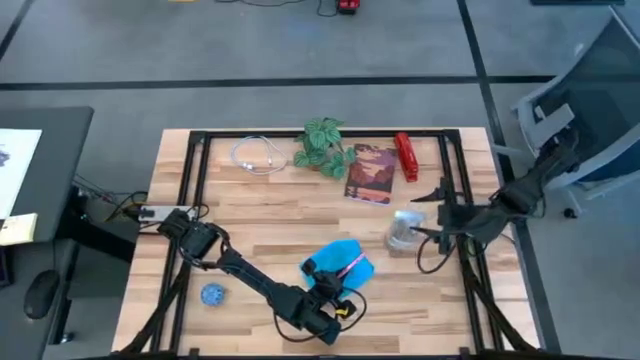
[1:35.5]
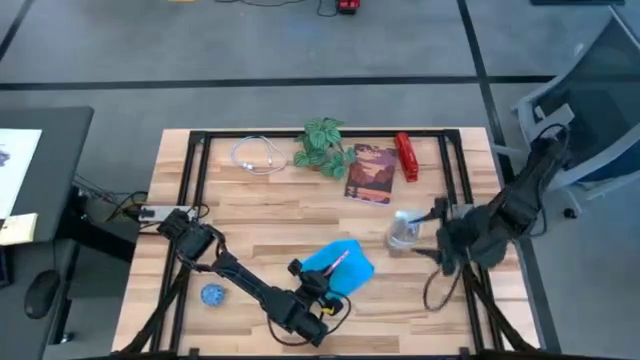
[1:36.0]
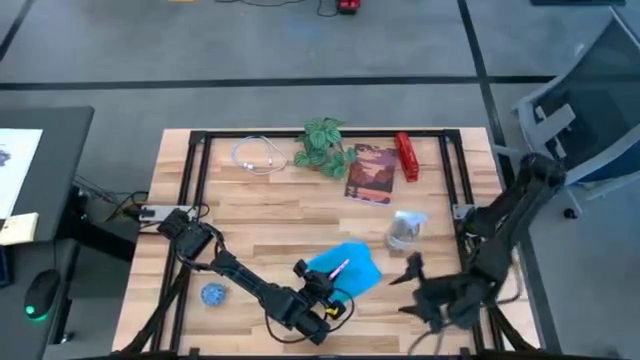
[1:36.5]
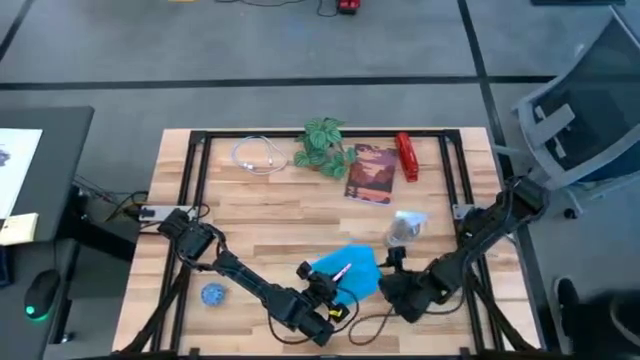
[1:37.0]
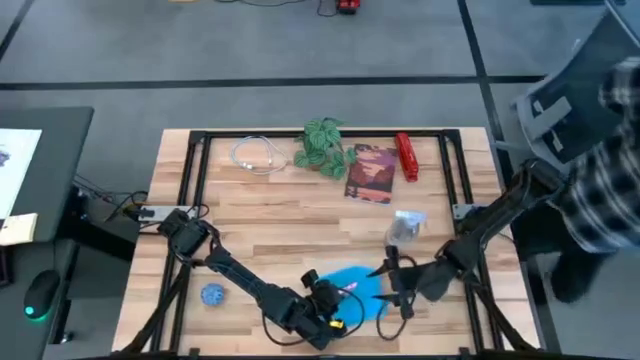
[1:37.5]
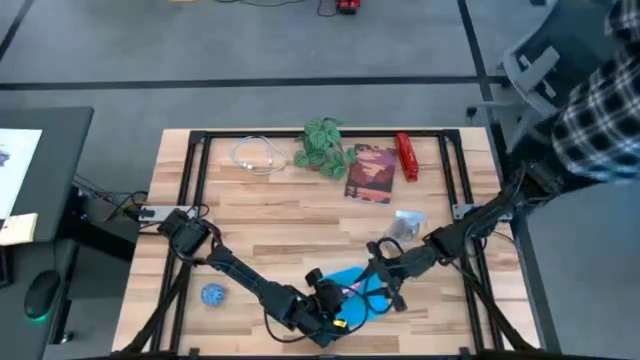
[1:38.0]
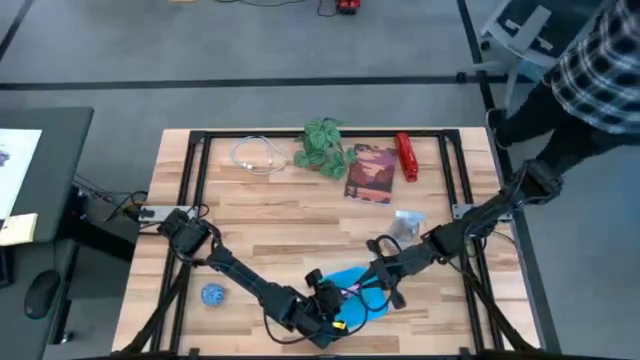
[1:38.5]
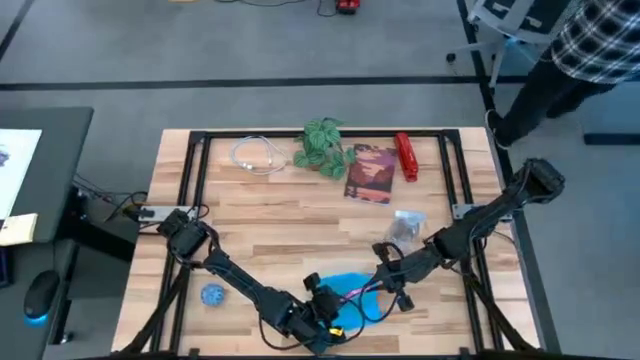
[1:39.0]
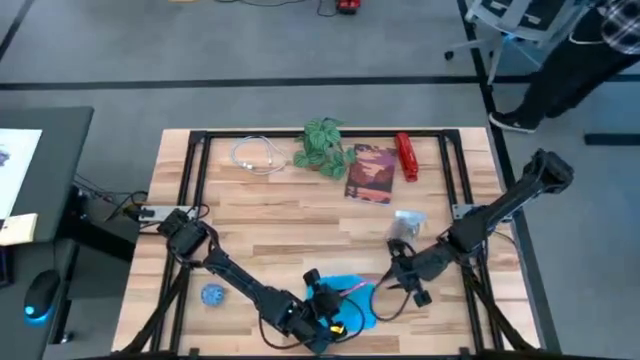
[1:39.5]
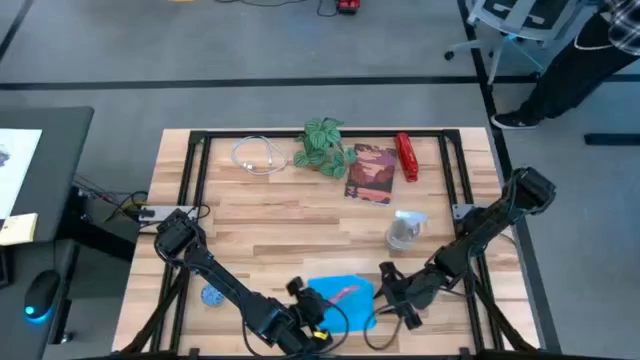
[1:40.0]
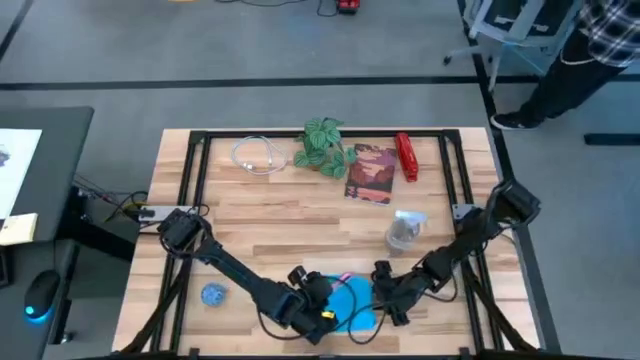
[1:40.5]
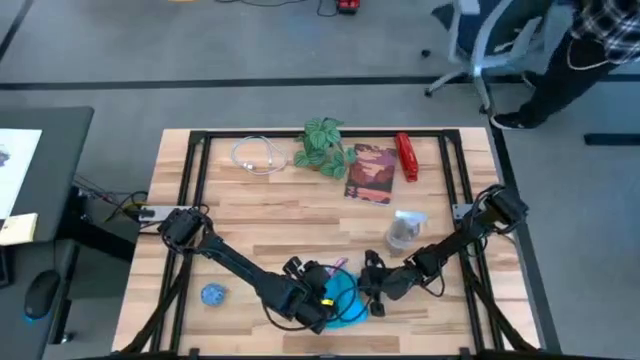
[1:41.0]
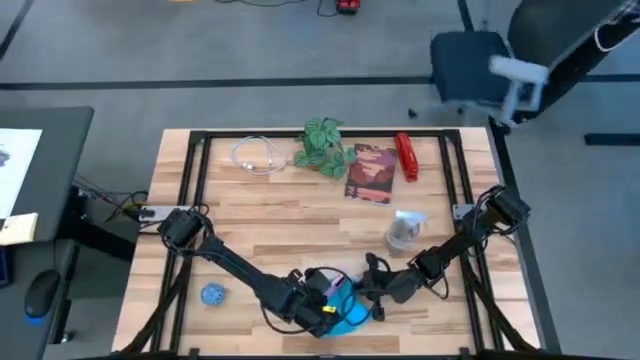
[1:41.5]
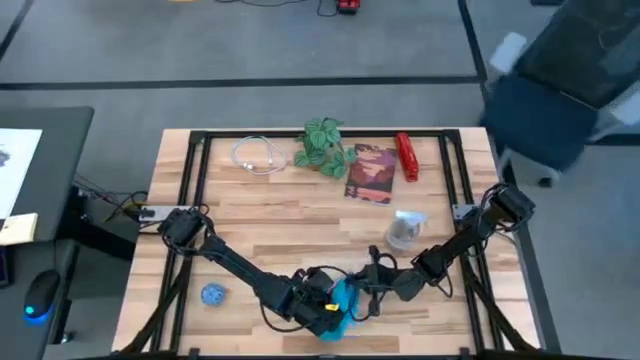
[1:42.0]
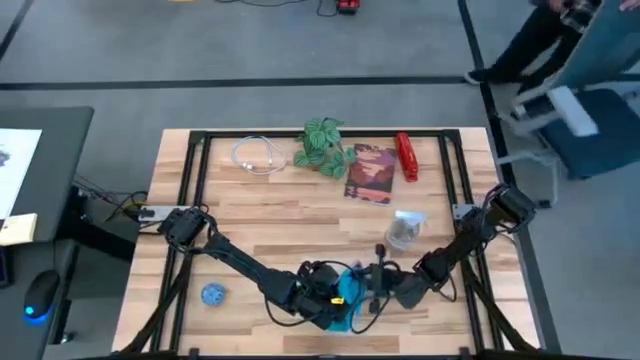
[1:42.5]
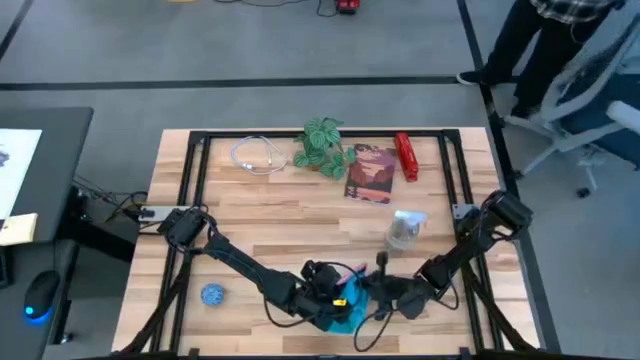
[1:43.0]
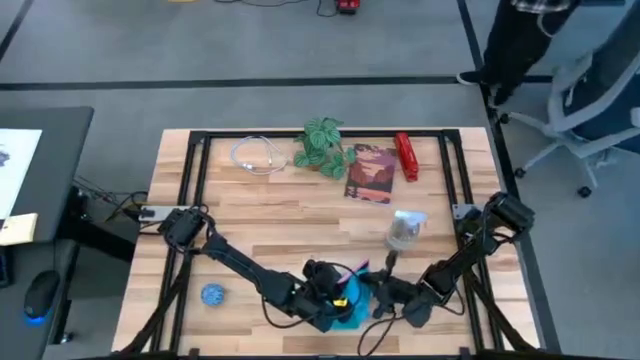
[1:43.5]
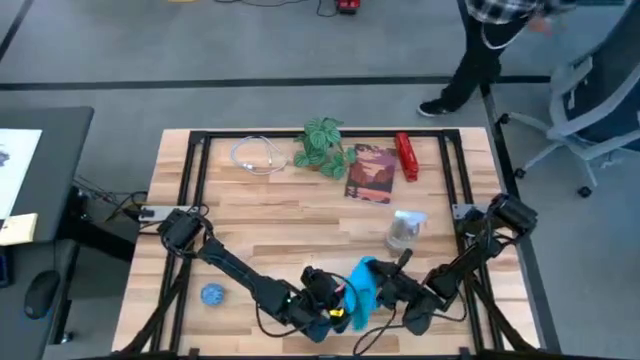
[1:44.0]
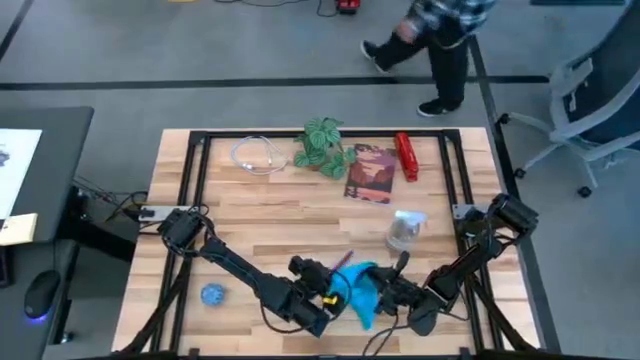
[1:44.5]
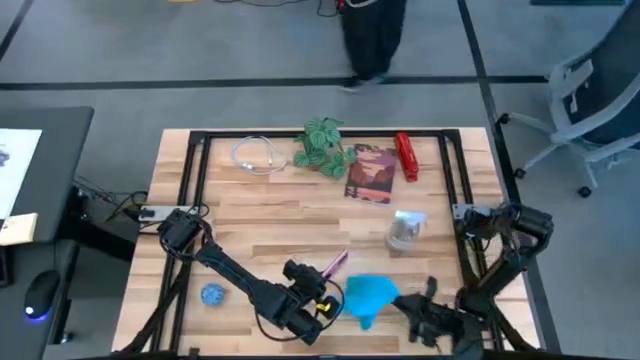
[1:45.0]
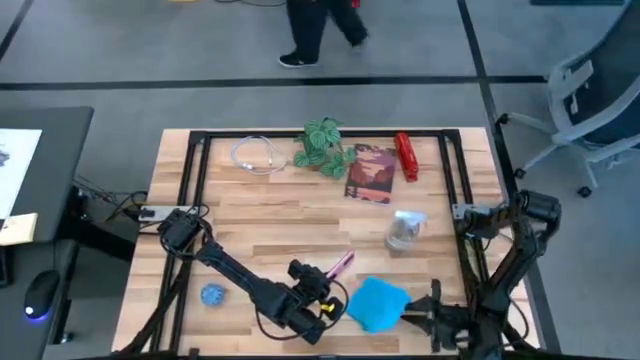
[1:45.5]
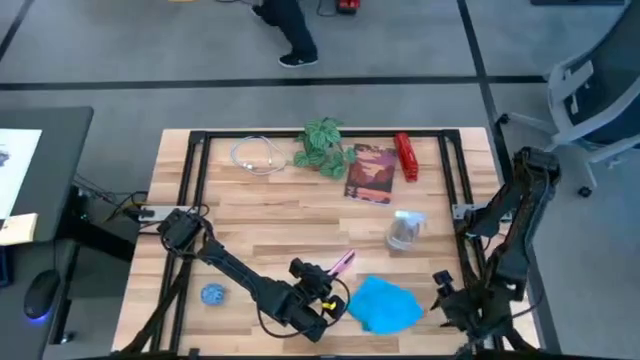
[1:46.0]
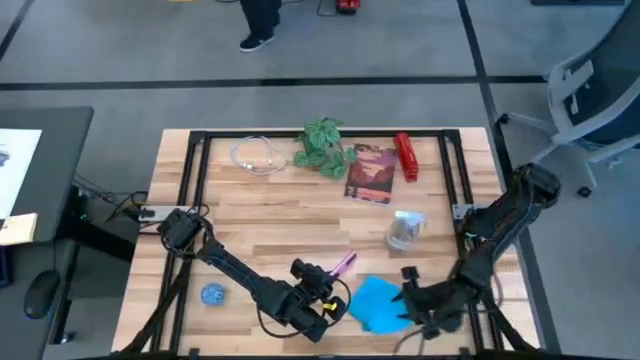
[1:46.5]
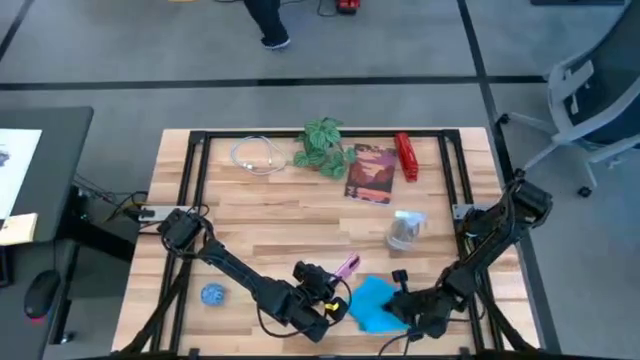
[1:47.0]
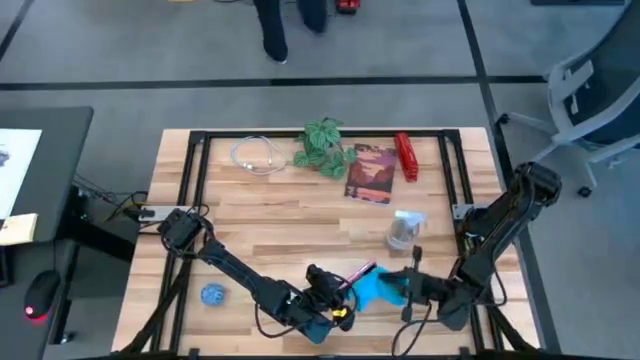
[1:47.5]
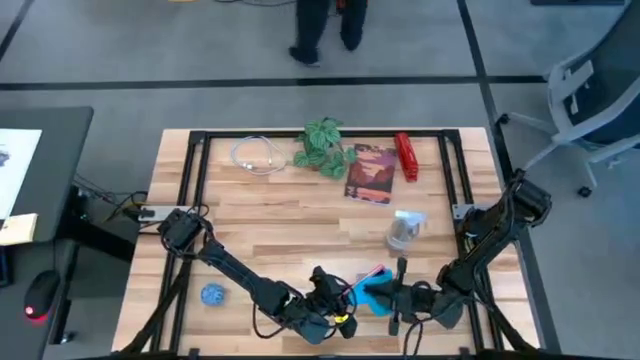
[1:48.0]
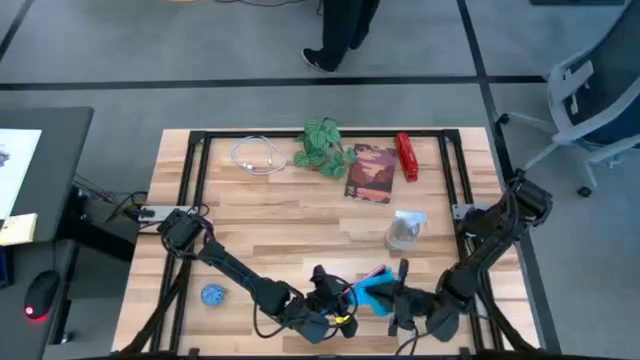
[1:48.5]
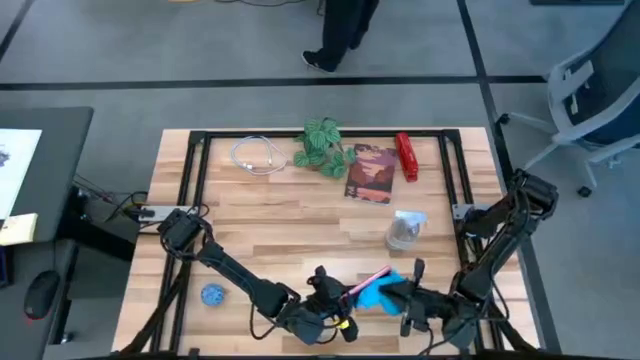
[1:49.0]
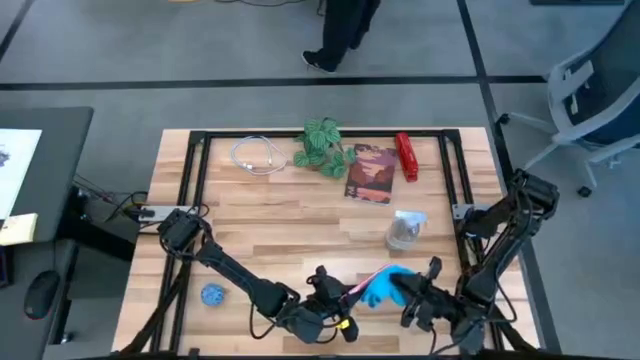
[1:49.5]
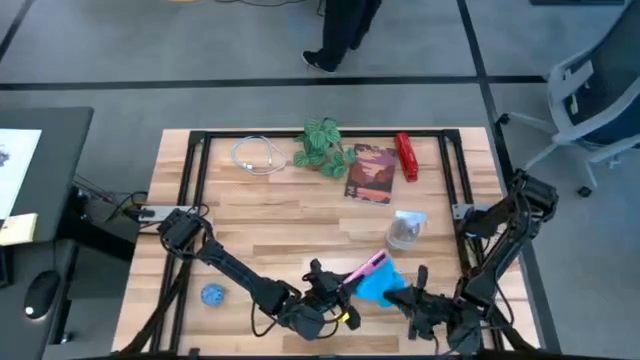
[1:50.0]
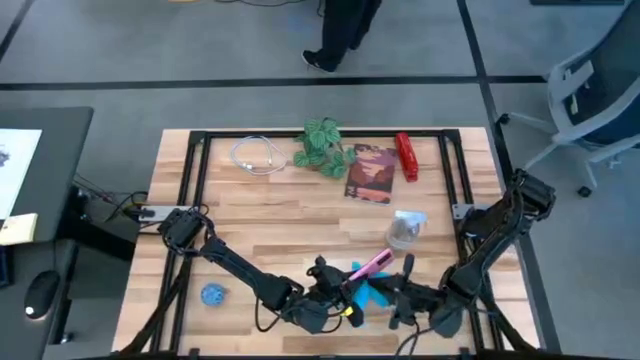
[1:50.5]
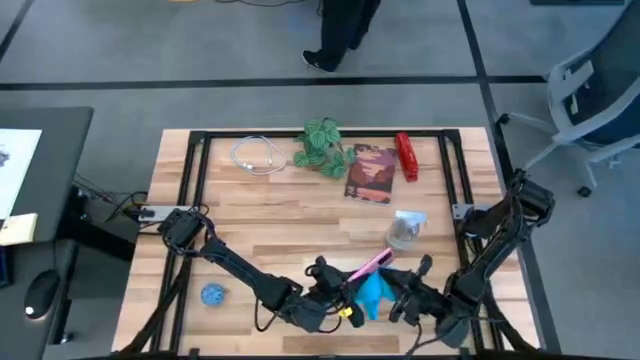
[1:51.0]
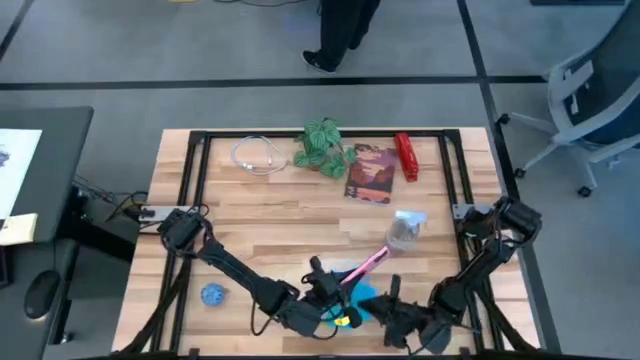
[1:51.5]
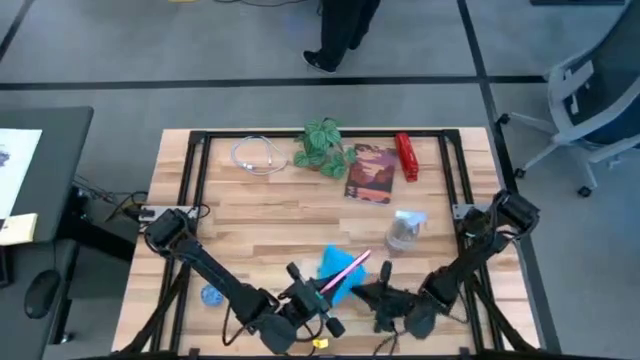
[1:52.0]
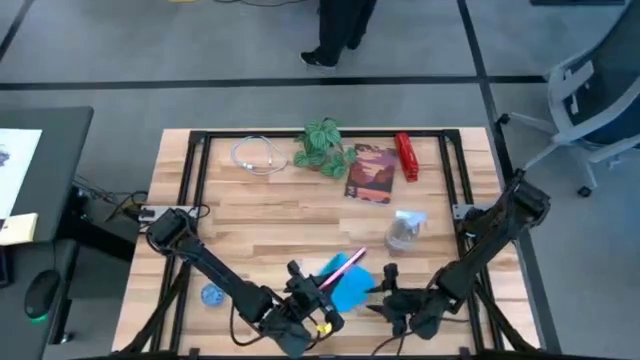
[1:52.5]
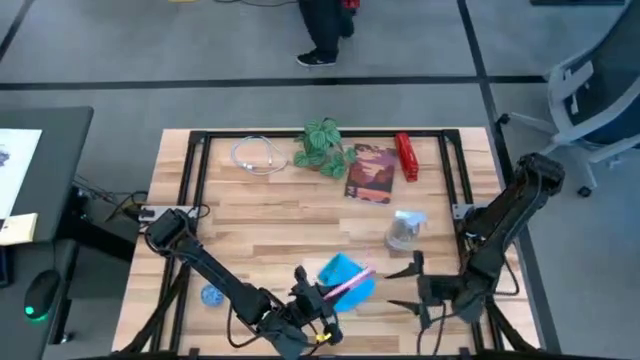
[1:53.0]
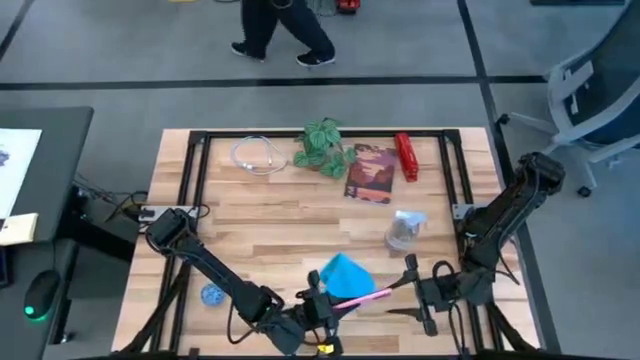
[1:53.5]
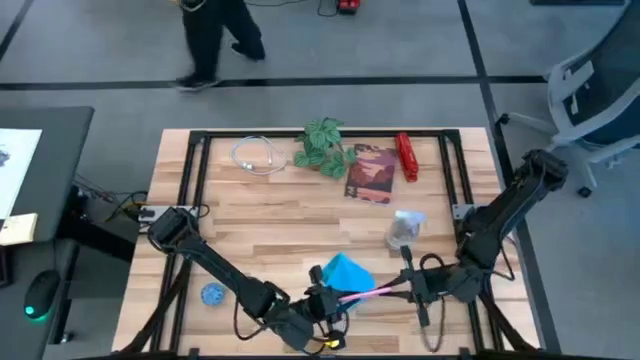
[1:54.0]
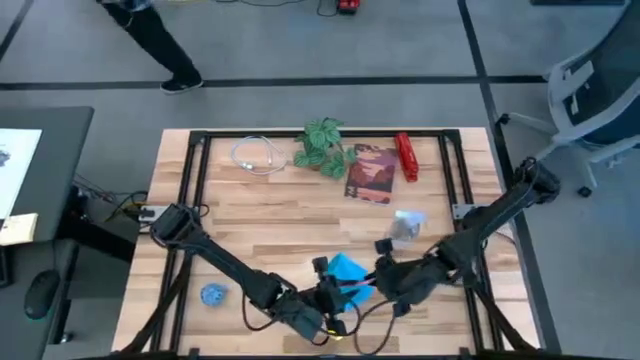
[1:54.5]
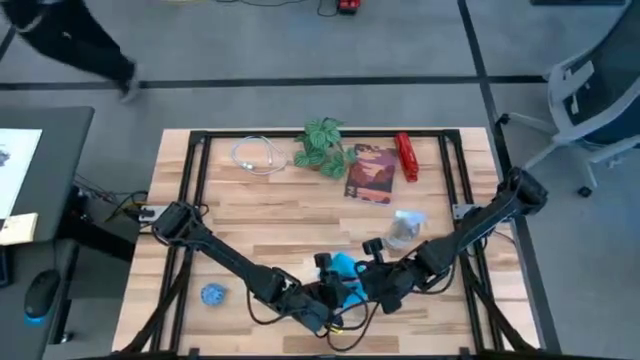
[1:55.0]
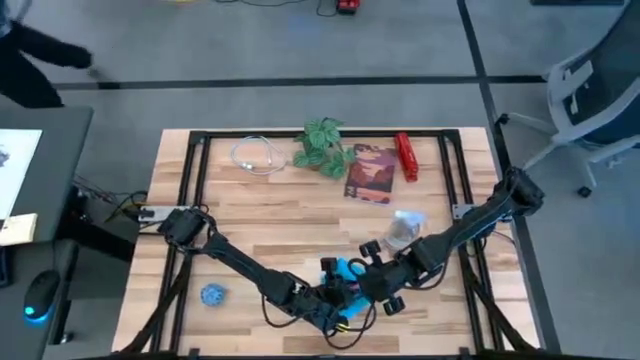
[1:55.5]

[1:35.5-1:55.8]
Task: Apply microfiber cloth
Wipe the back and front of the pink cellphone with the blue microfiber cloth

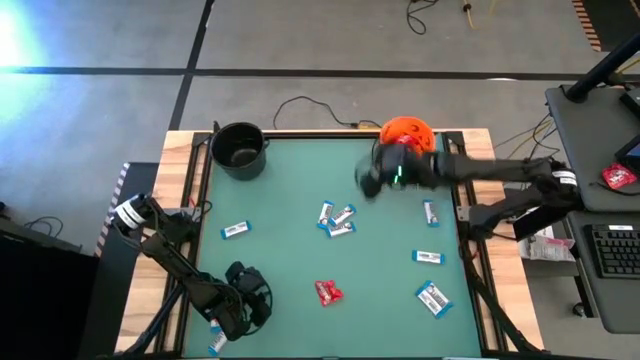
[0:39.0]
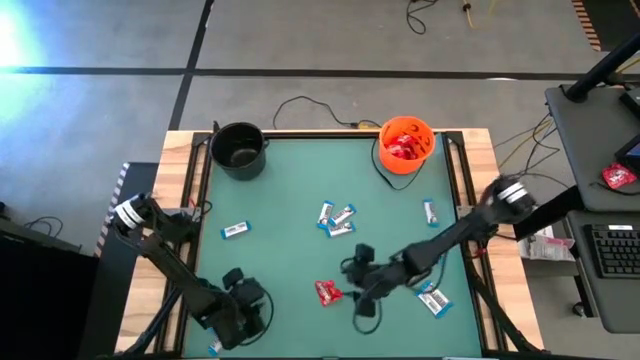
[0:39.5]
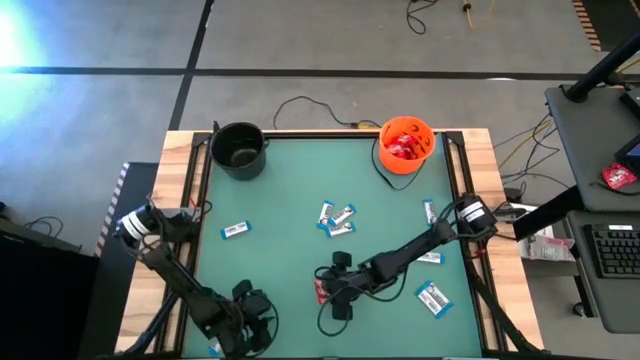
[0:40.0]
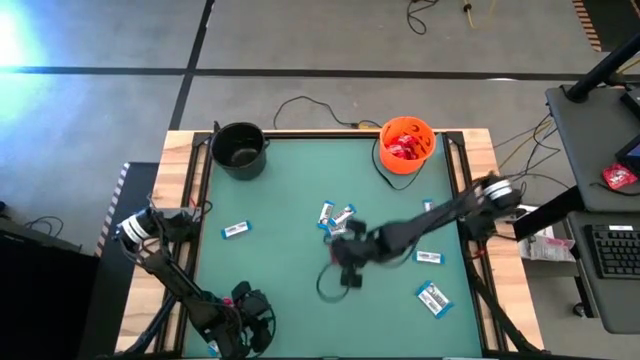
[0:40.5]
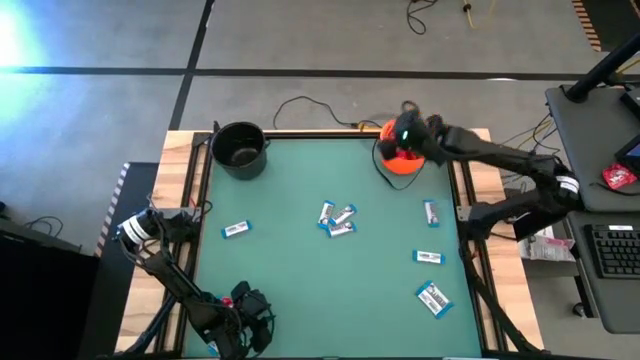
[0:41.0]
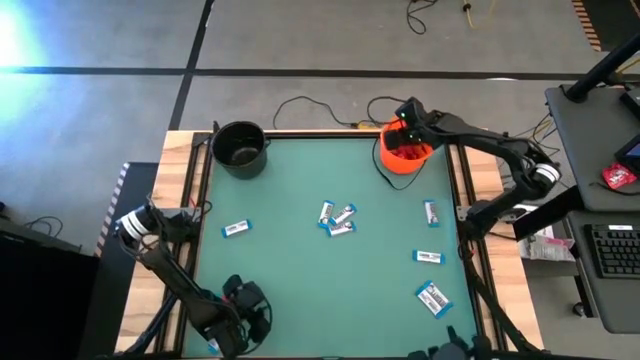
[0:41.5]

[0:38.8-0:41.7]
Task: Sort candy by brand, put in halloween buckets
Put the red candy into the orange bucket
